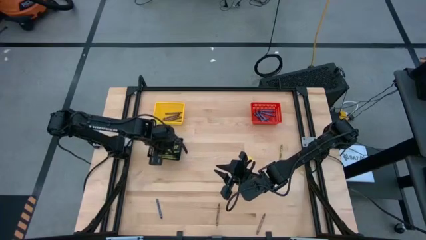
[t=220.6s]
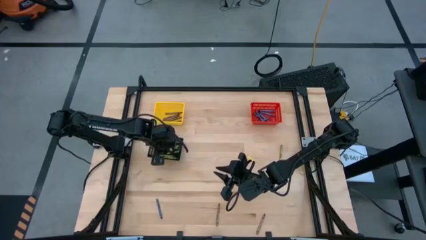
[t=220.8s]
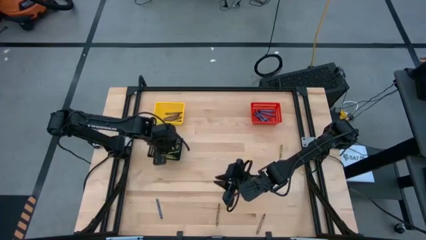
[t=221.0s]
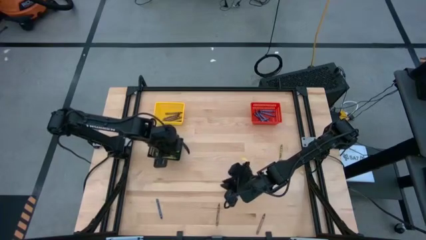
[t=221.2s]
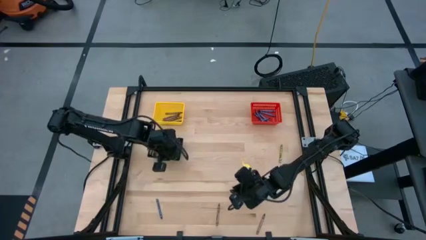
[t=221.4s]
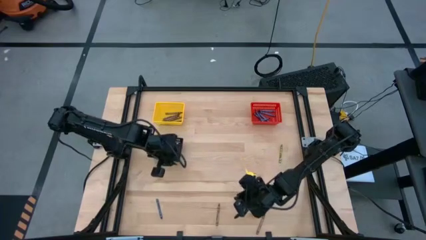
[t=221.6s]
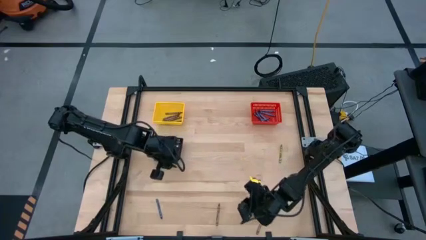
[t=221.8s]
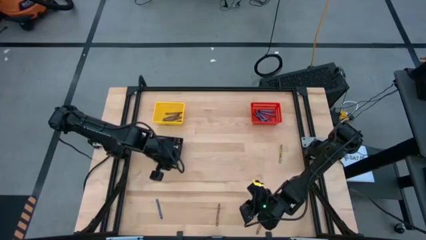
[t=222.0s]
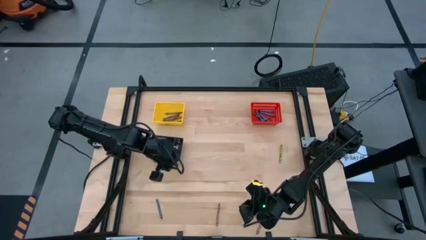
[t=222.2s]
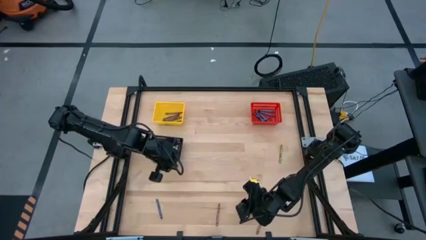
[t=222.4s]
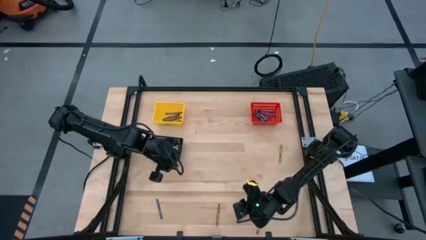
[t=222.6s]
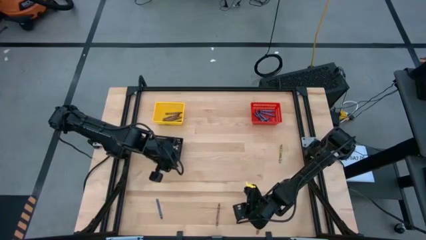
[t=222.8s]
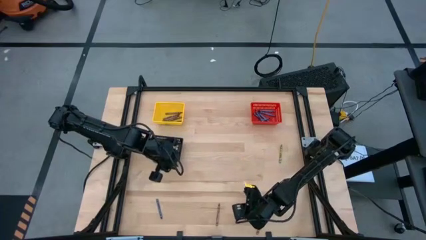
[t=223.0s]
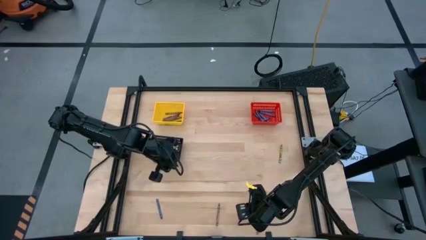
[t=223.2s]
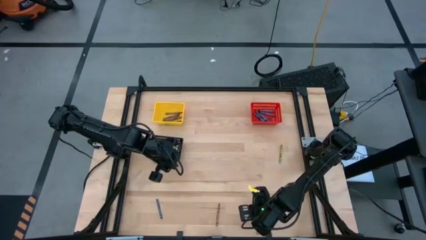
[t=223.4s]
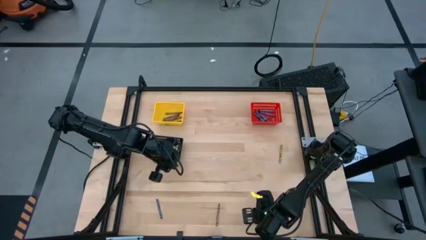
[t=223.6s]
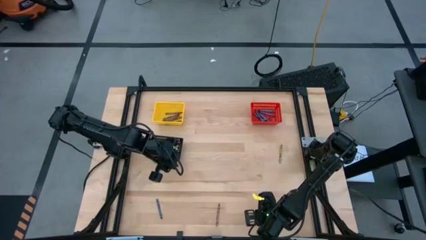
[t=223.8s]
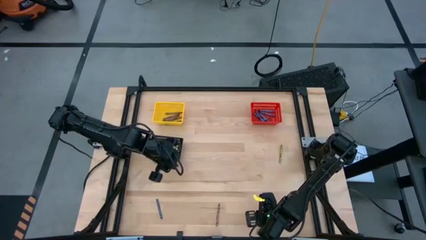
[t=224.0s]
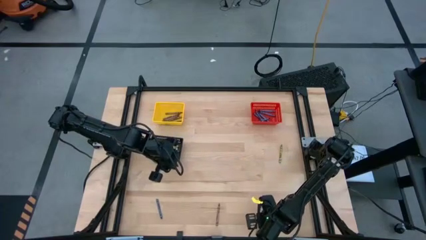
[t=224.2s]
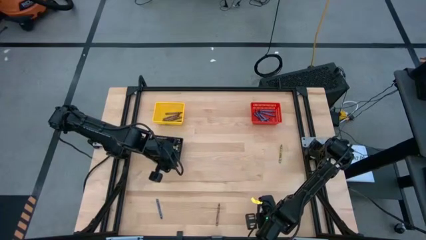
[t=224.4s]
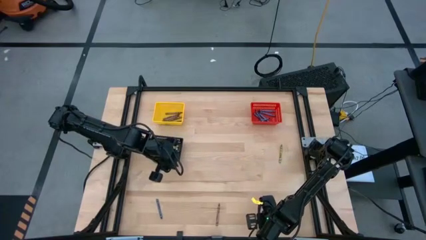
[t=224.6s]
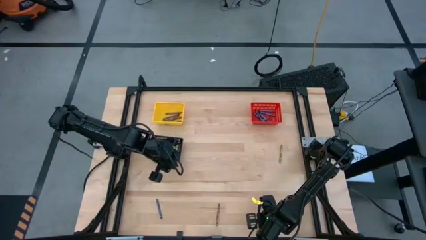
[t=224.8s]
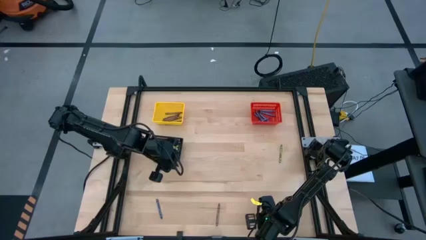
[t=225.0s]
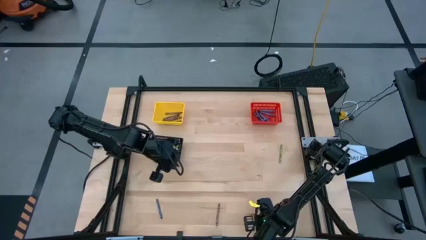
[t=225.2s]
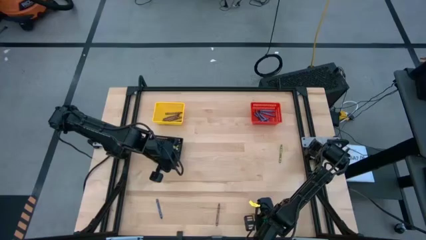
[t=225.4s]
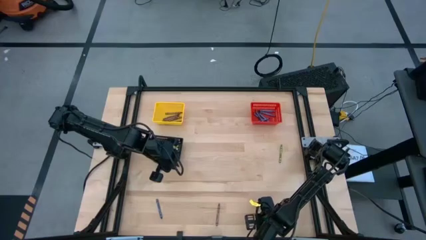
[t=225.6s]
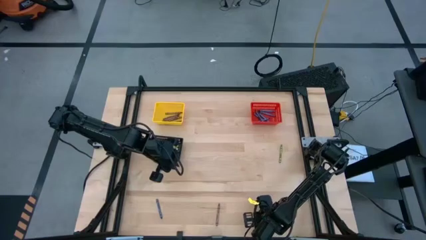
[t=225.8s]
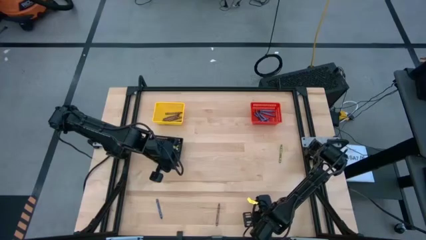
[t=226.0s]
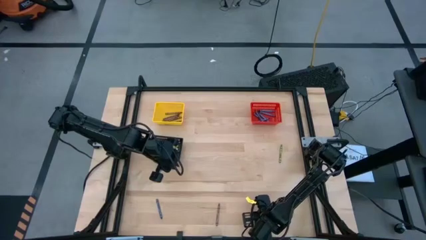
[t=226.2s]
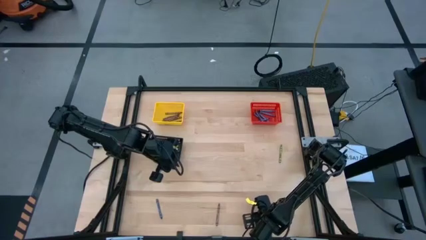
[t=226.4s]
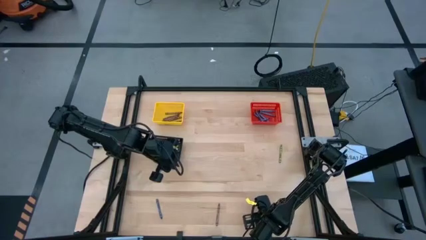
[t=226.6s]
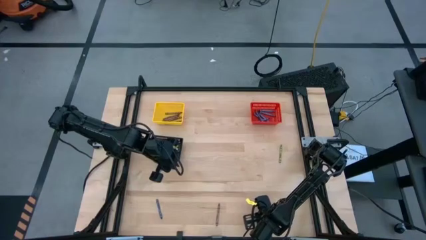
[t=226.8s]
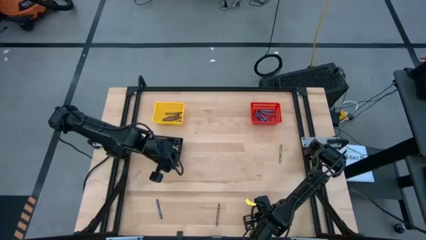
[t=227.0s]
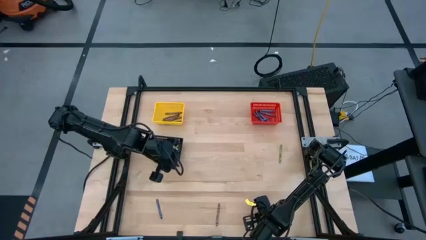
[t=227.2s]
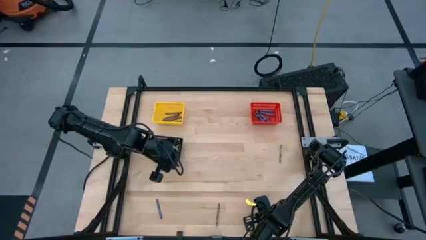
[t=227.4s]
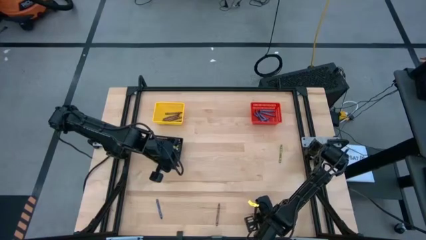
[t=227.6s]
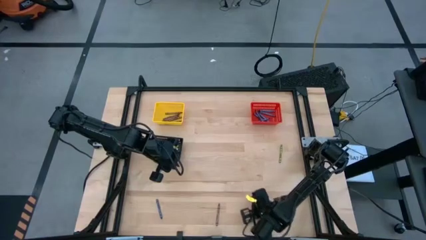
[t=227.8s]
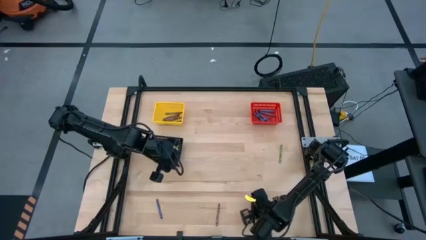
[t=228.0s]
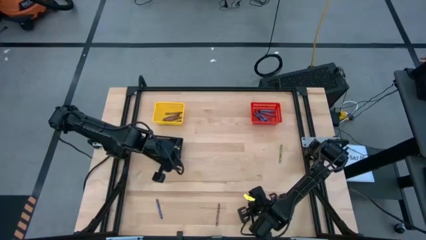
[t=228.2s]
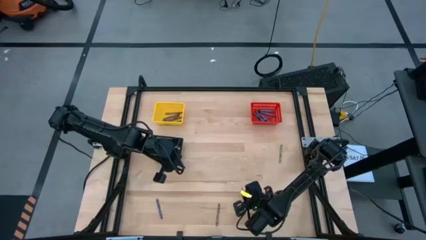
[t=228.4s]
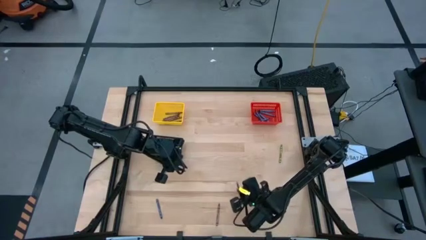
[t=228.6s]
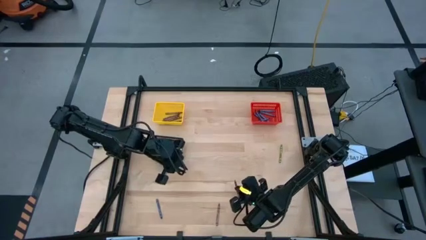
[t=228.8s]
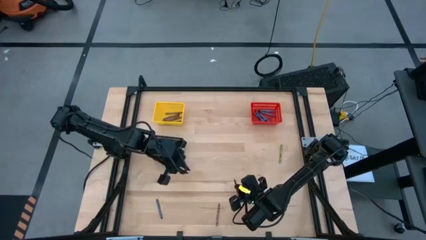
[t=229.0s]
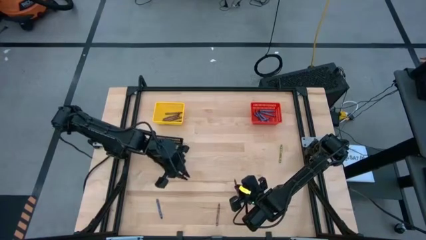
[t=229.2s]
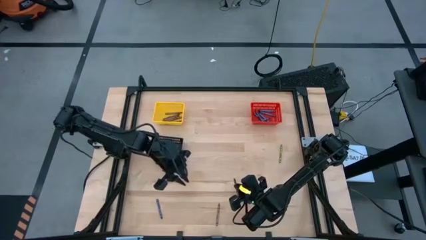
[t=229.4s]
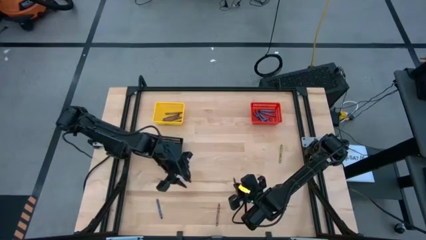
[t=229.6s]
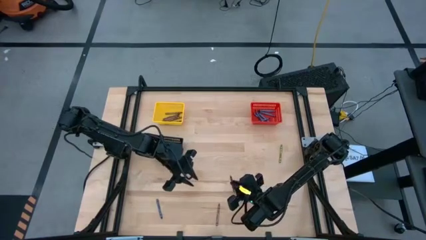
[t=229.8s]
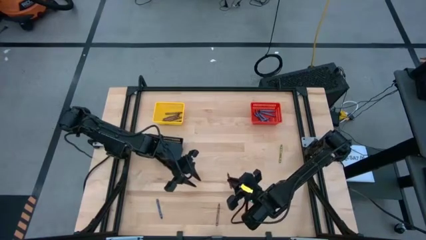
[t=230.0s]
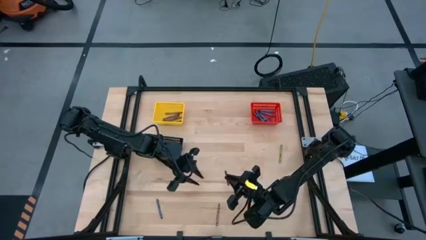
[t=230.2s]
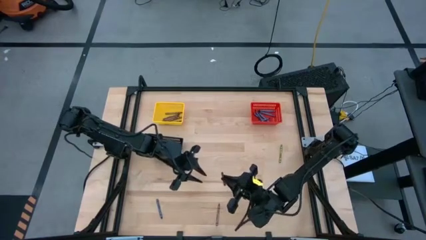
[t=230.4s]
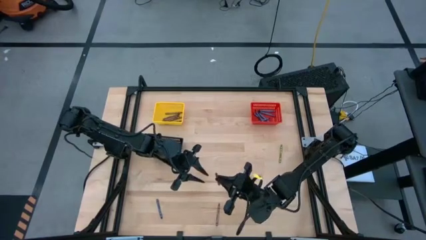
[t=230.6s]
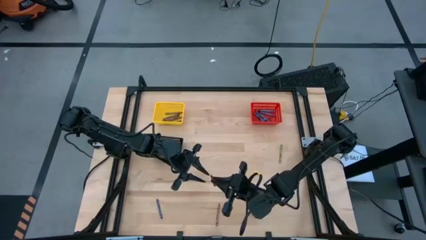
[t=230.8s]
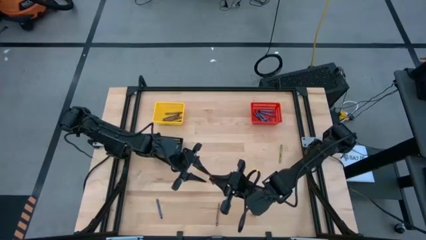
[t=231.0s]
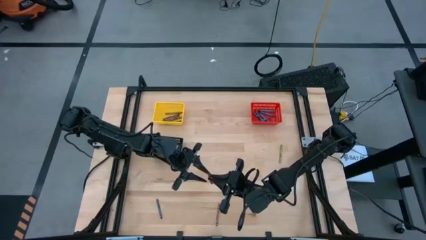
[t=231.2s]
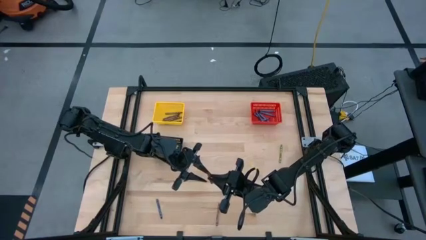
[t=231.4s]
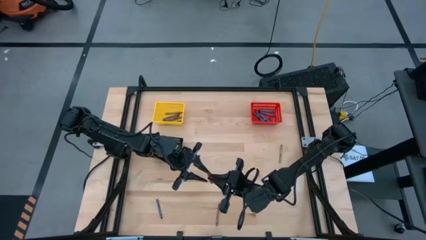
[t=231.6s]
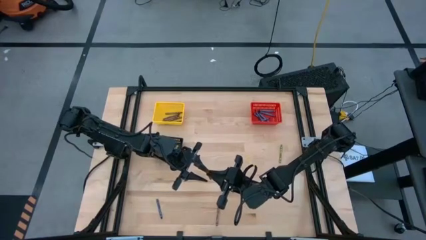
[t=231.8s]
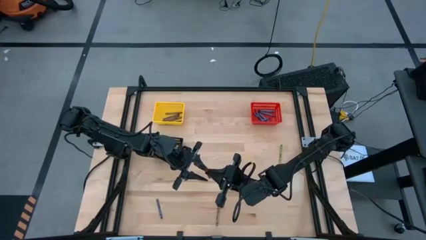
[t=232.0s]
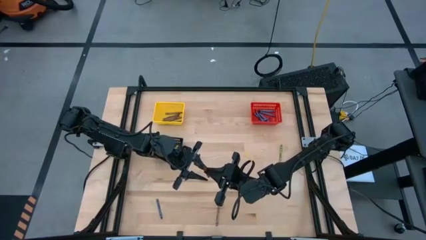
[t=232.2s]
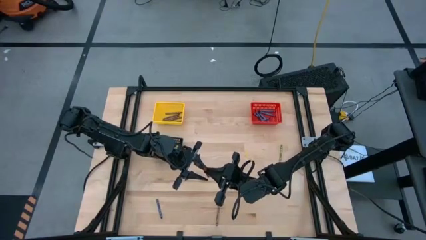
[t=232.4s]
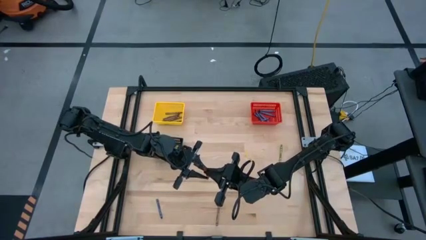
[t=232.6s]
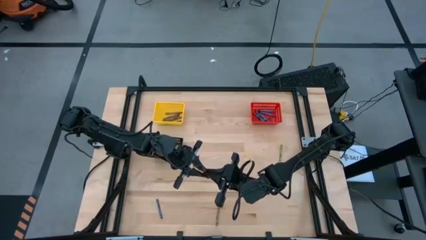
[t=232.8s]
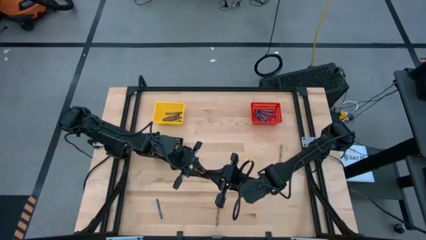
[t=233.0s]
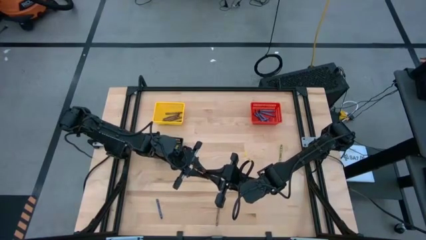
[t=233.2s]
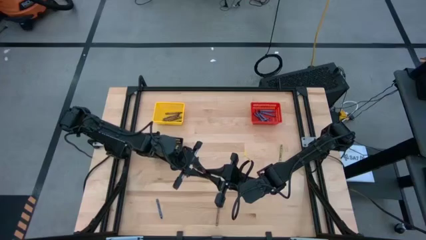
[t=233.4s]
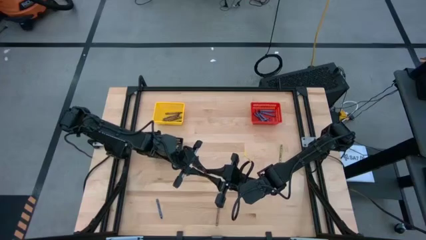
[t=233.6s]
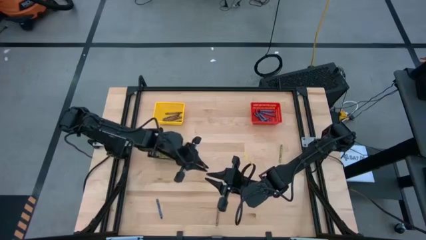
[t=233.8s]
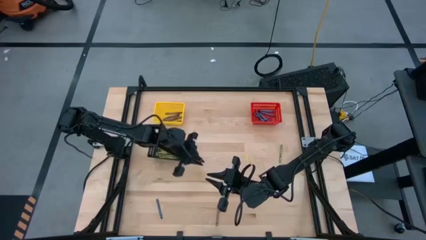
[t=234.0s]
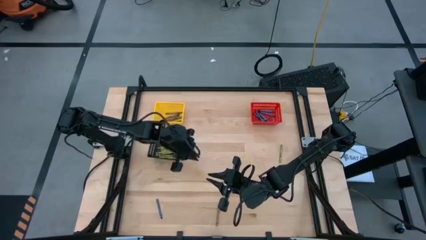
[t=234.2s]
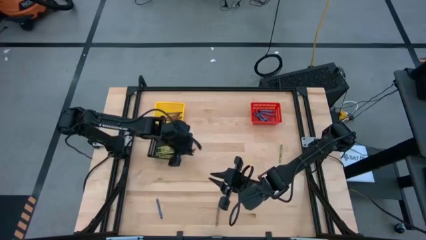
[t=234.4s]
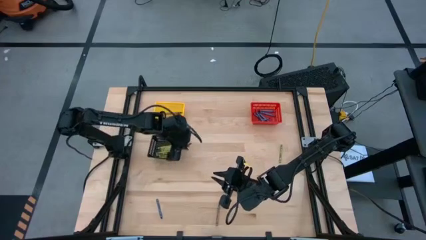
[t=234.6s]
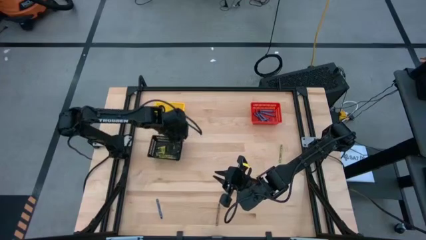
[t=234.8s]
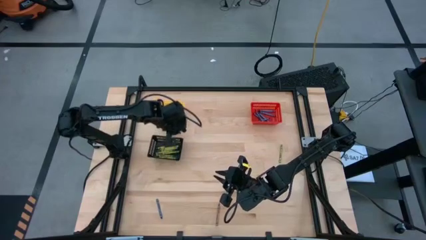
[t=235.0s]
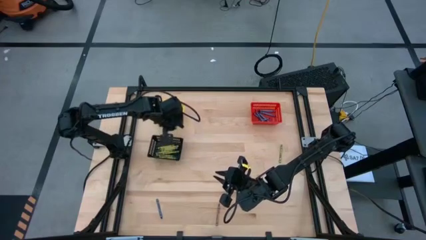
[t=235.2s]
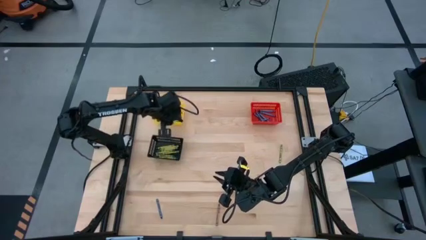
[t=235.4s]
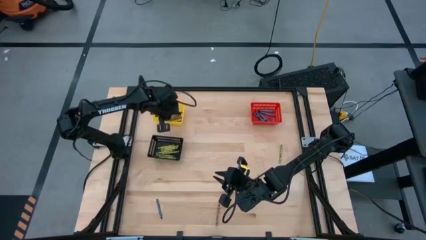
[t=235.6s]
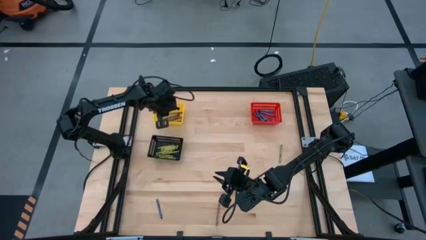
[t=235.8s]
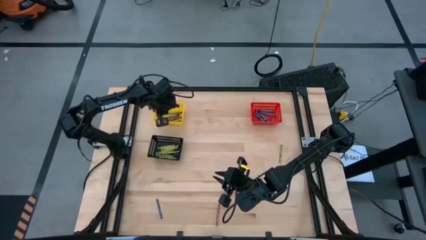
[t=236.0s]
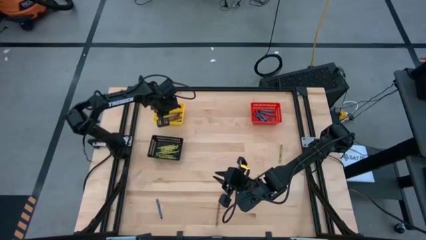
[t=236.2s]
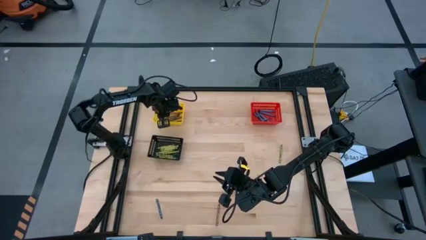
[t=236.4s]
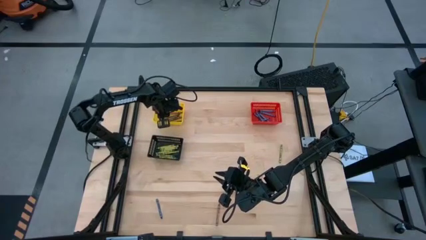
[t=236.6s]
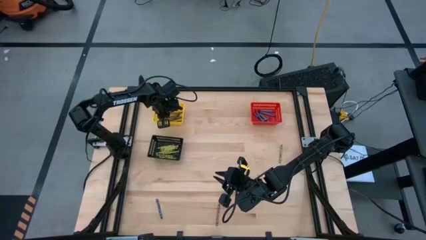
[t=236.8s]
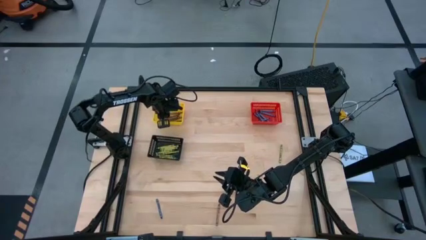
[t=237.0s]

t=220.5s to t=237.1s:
Task: Sort crayons
Put the brown crayon into the yellow bin
